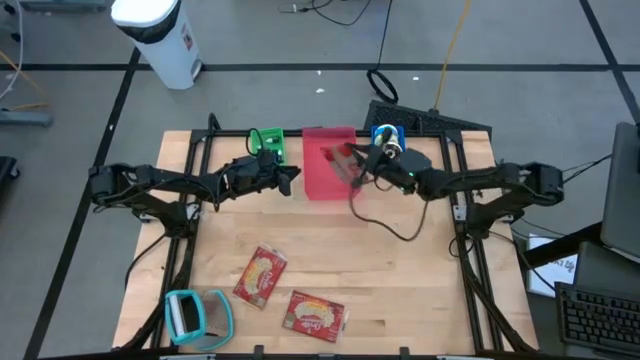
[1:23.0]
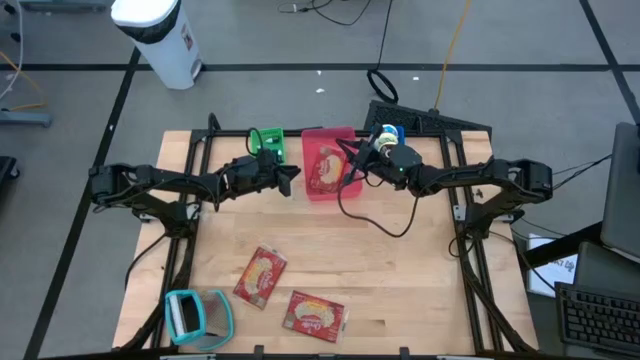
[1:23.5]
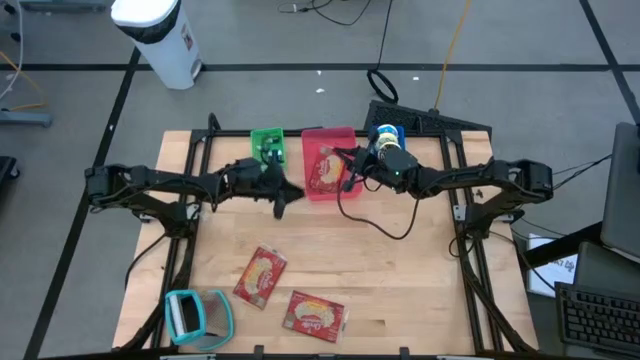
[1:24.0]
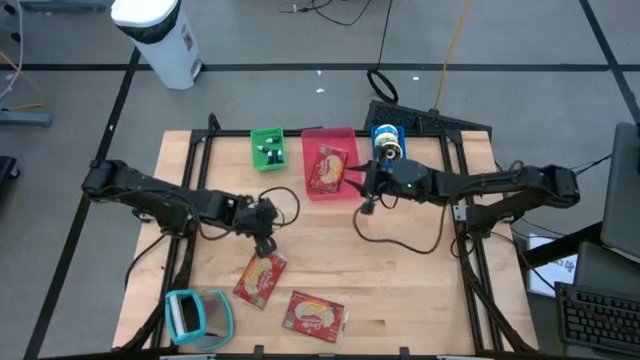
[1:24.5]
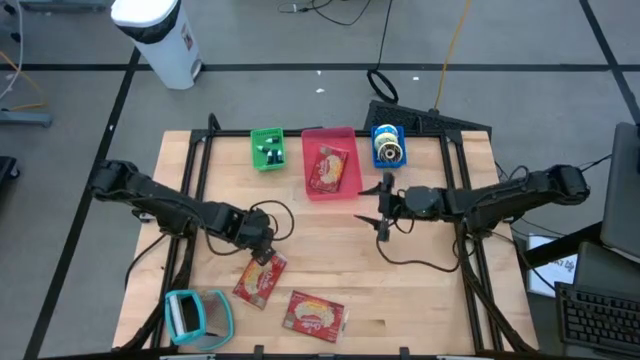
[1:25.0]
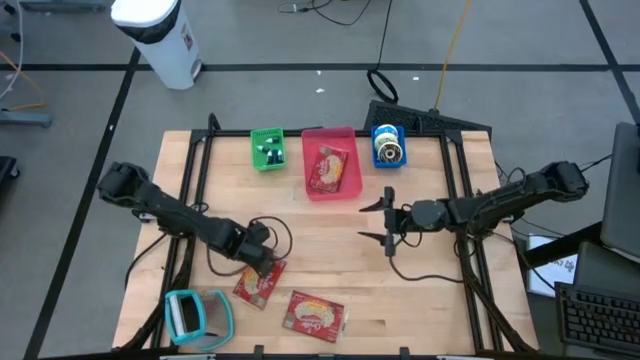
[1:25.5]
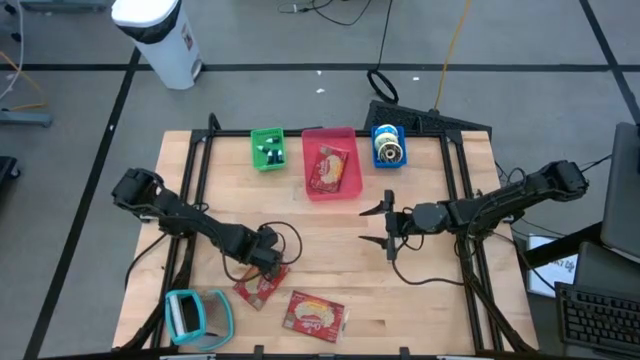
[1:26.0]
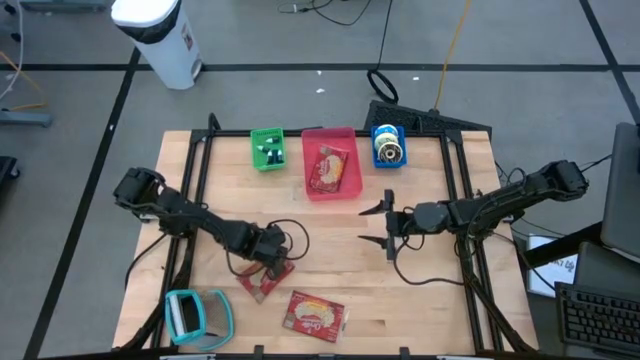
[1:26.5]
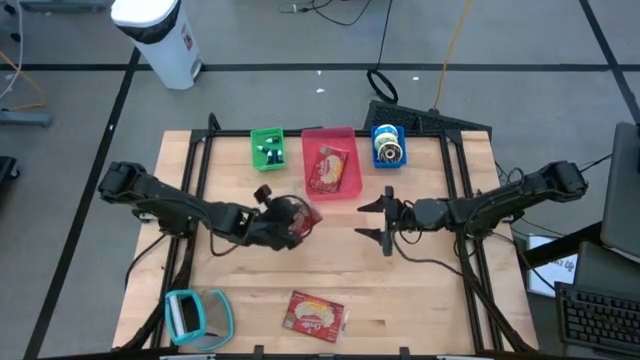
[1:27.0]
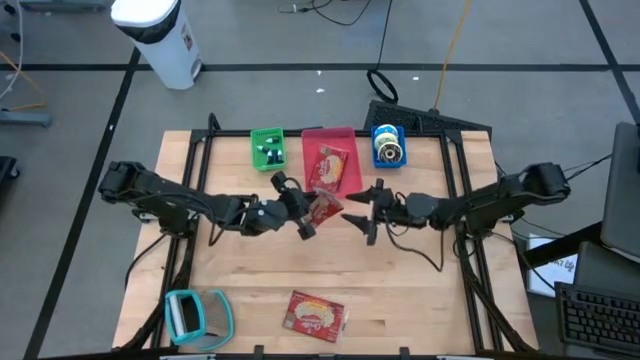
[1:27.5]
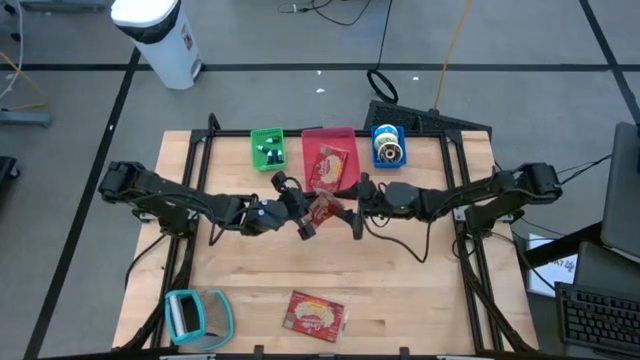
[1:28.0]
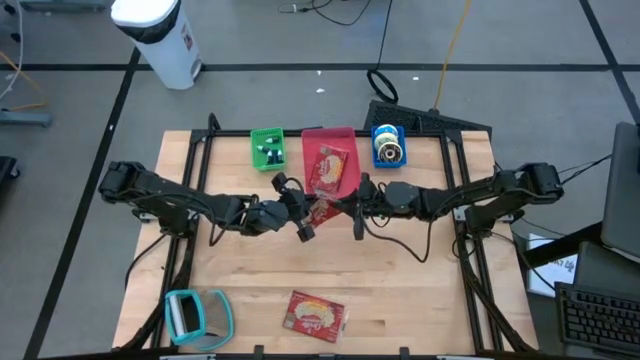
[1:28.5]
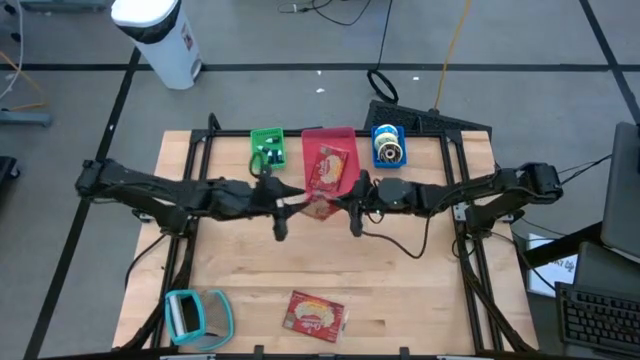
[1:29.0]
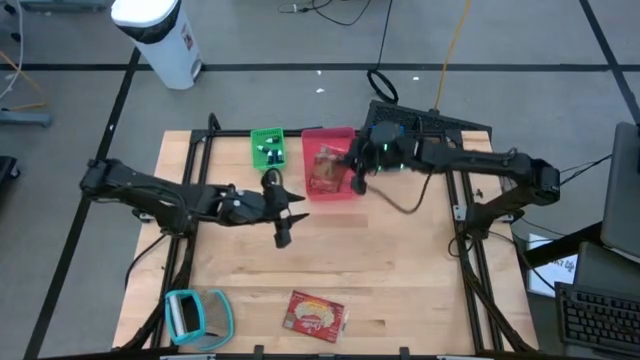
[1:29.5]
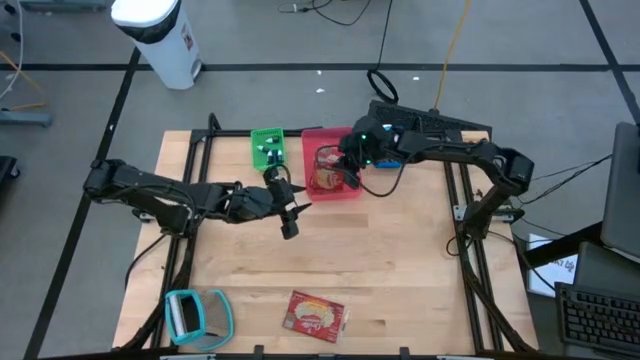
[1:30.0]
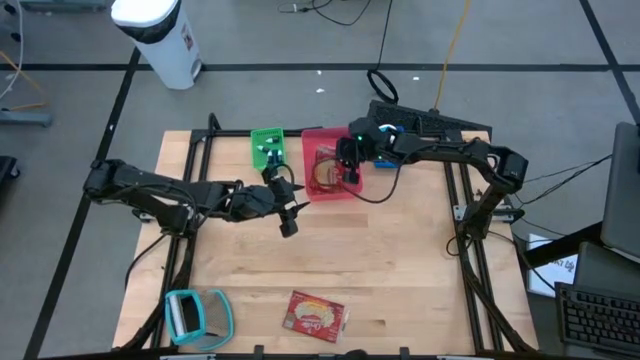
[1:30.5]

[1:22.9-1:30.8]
Put the left red popcorn bag into the red bin

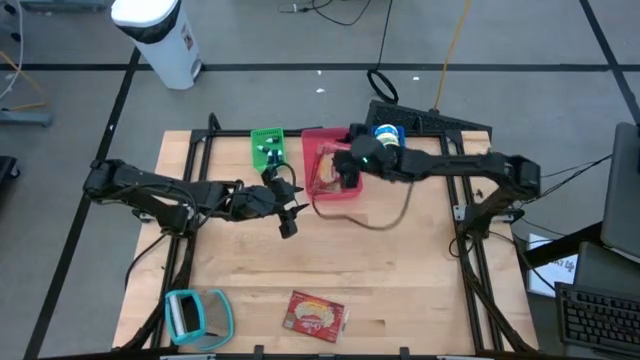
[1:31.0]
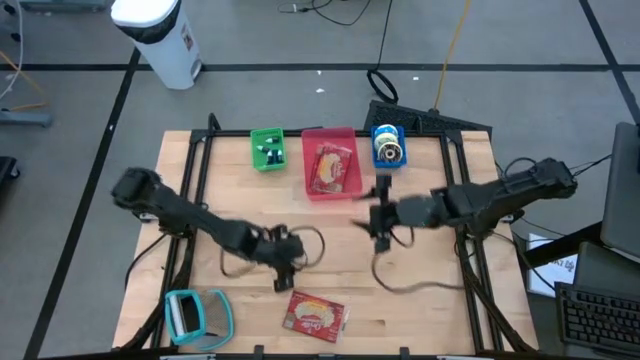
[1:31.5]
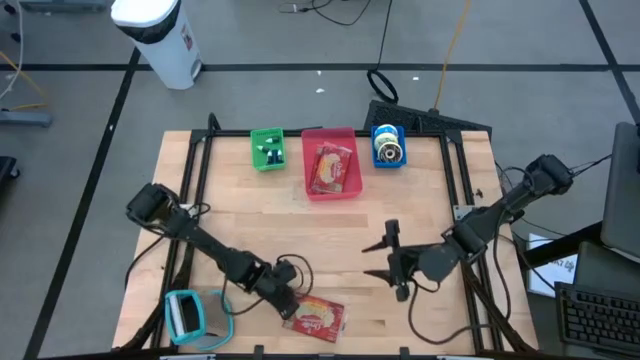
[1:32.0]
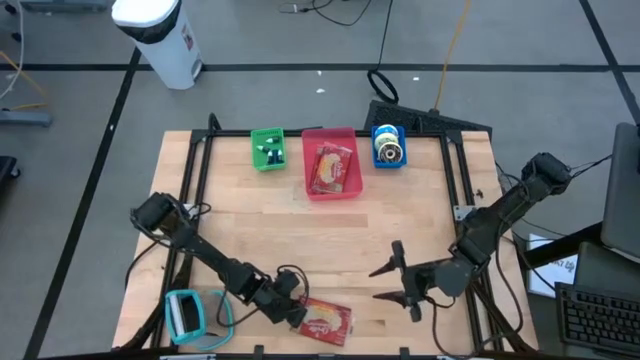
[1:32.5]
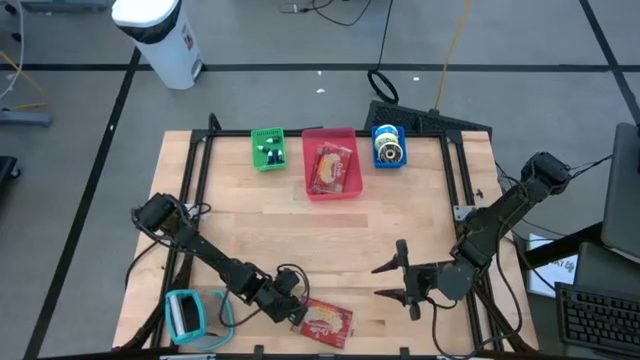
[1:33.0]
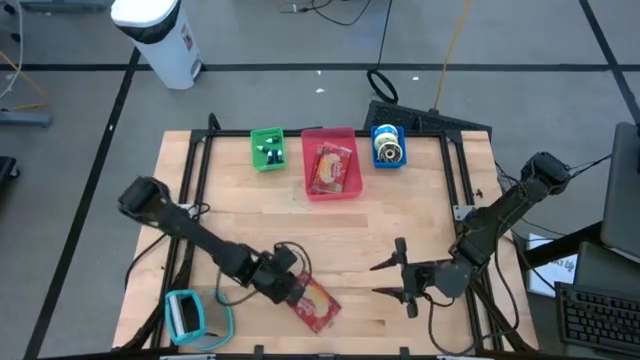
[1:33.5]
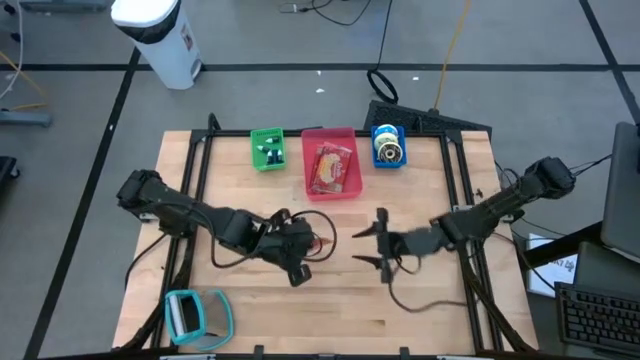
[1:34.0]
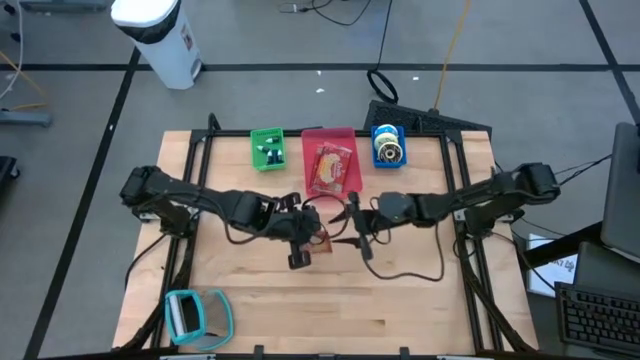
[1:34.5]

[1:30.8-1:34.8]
Put the red popcorn bag into the red bin

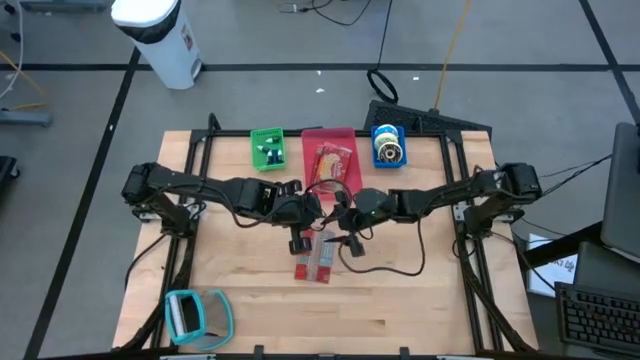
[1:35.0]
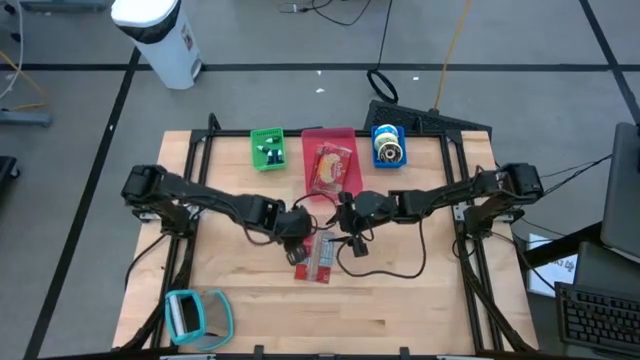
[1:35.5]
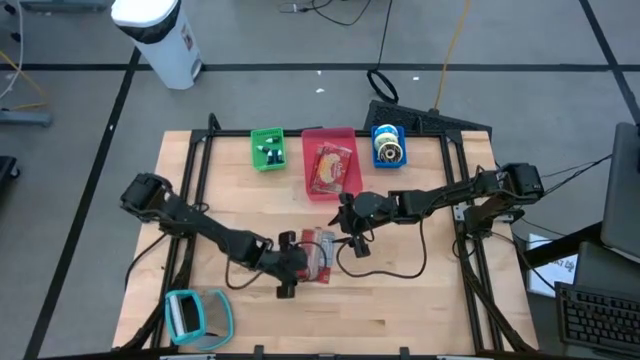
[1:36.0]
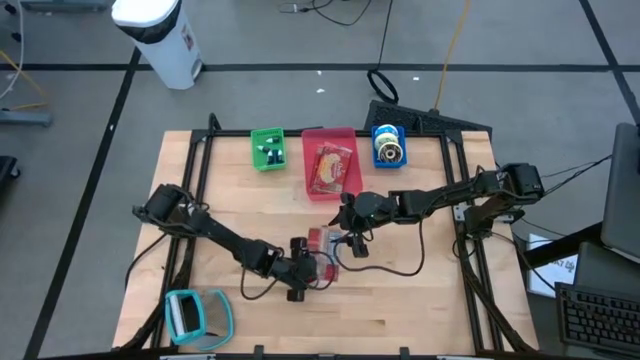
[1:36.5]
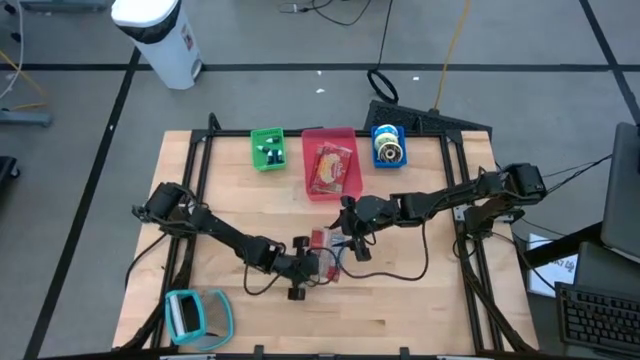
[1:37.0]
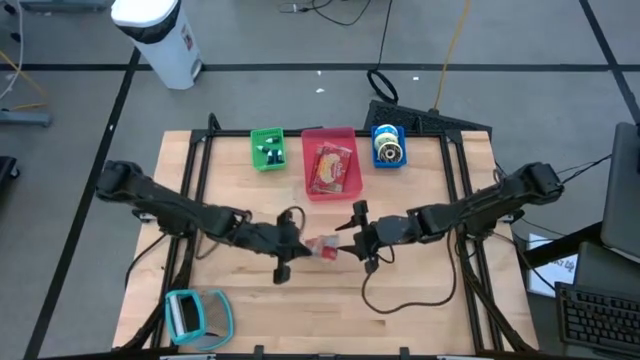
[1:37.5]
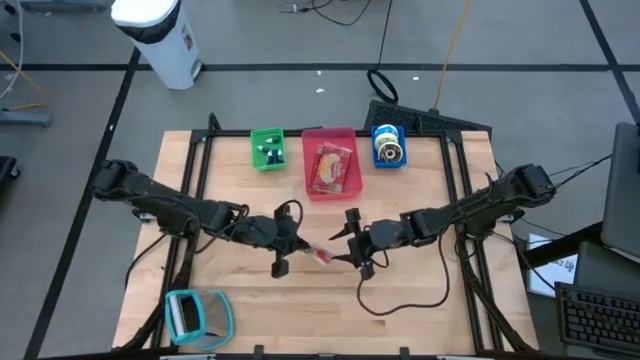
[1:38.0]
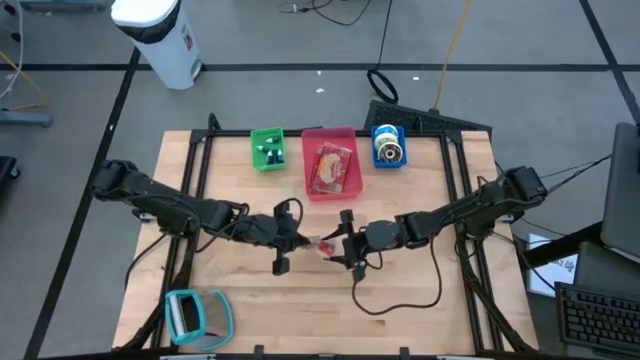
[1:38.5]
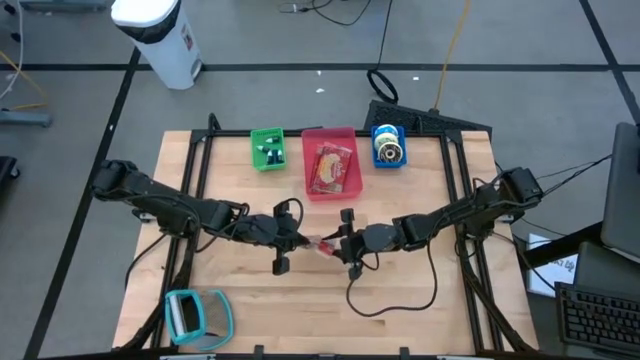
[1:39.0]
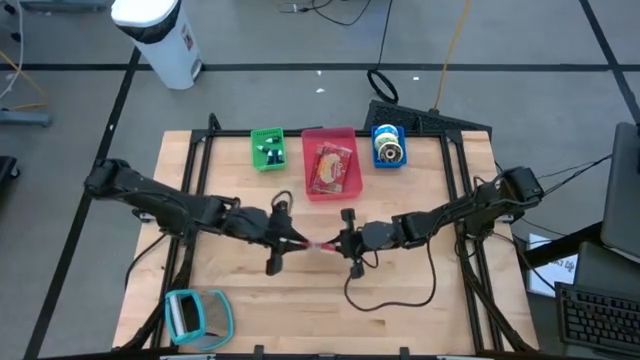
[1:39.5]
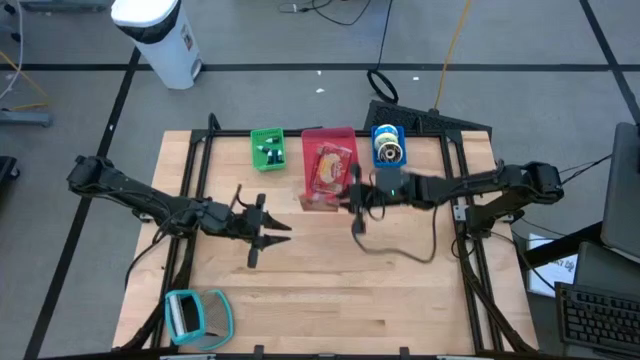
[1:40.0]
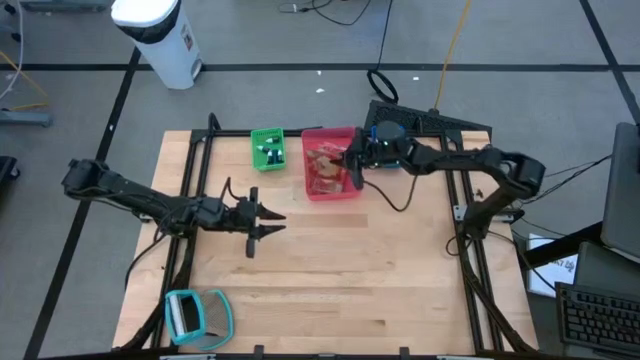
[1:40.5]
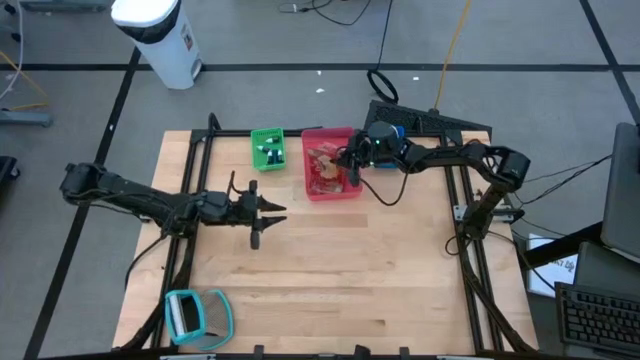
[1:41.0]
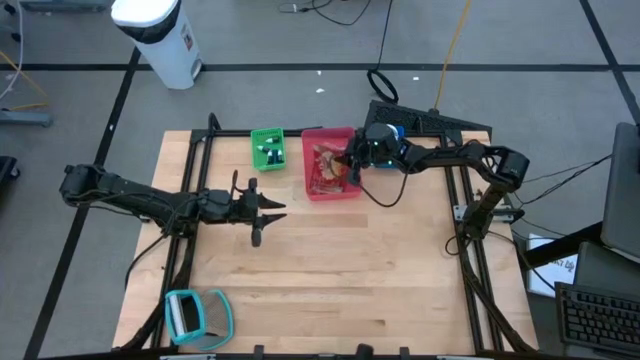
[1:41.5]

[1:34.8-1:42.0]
Put the red popcorn bag into the red bin
